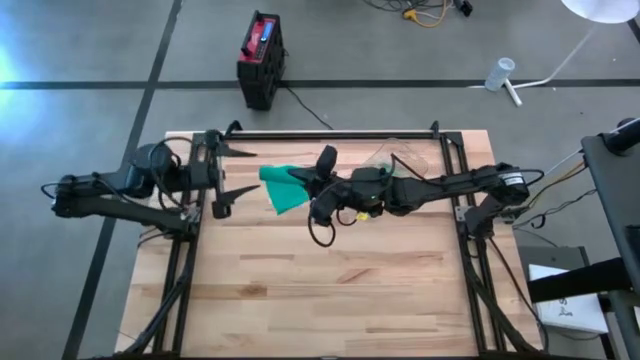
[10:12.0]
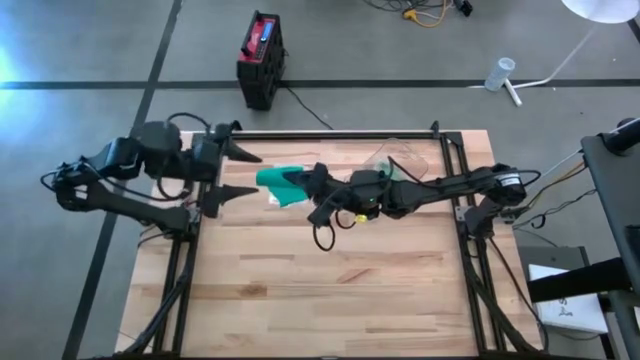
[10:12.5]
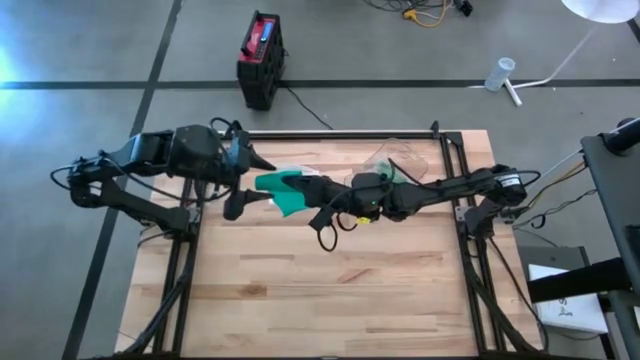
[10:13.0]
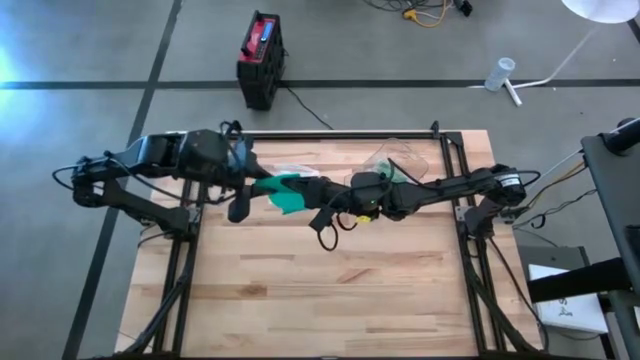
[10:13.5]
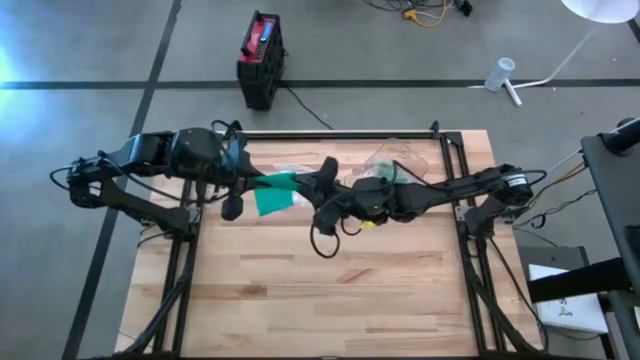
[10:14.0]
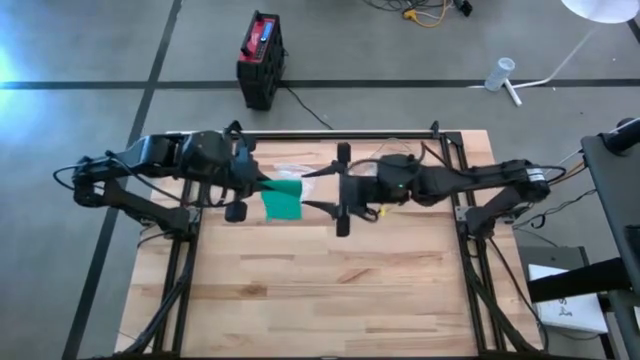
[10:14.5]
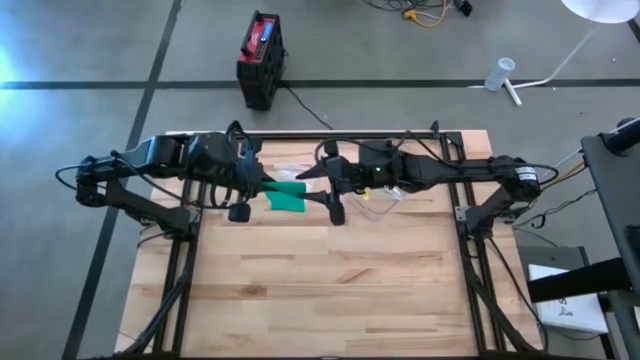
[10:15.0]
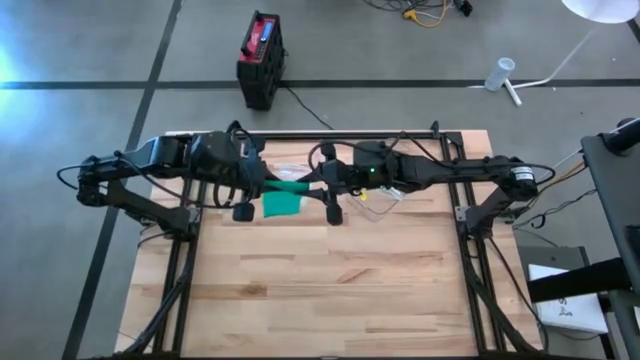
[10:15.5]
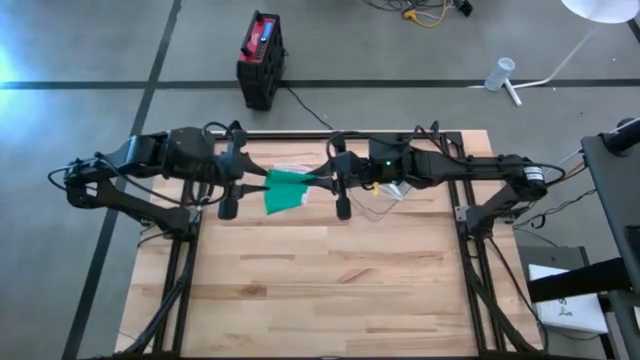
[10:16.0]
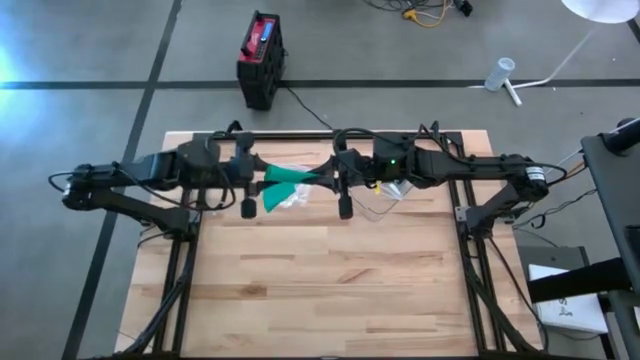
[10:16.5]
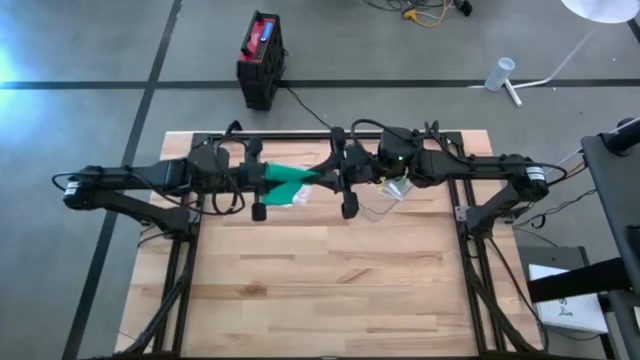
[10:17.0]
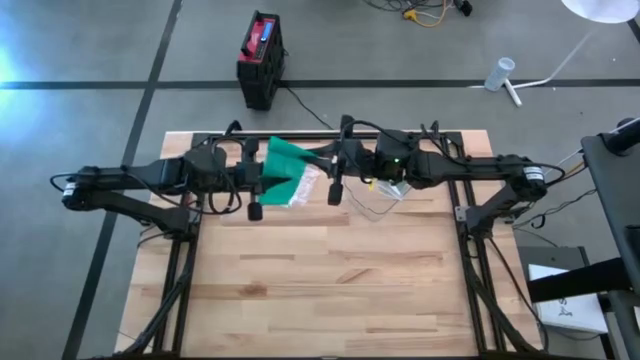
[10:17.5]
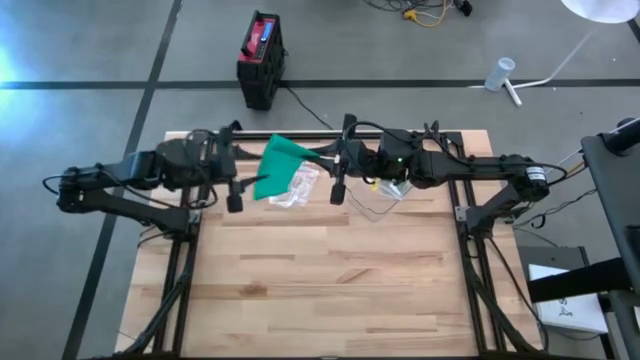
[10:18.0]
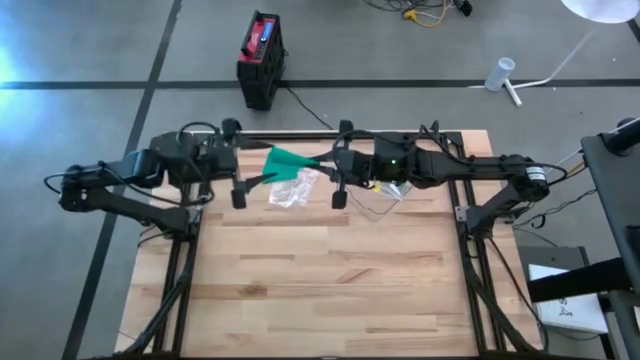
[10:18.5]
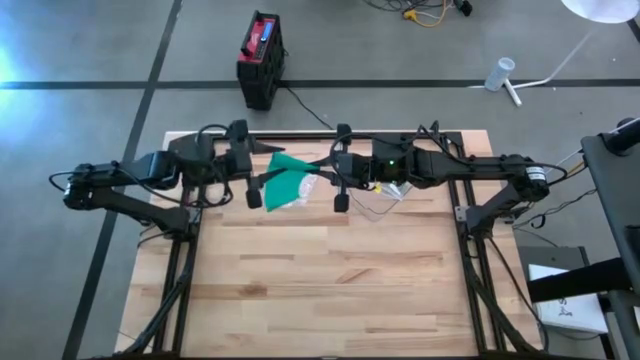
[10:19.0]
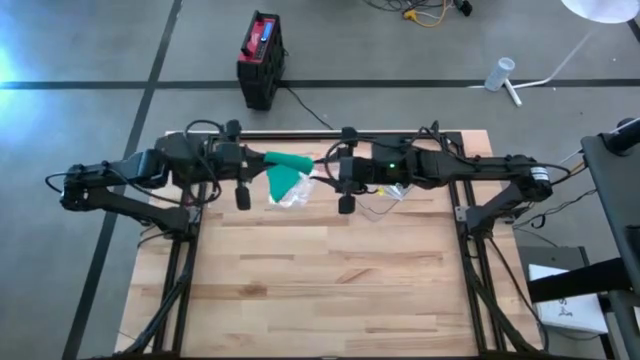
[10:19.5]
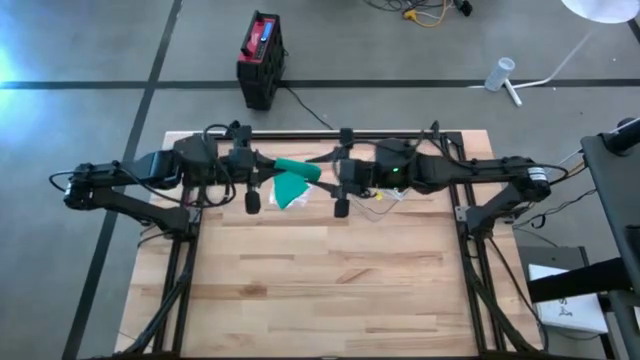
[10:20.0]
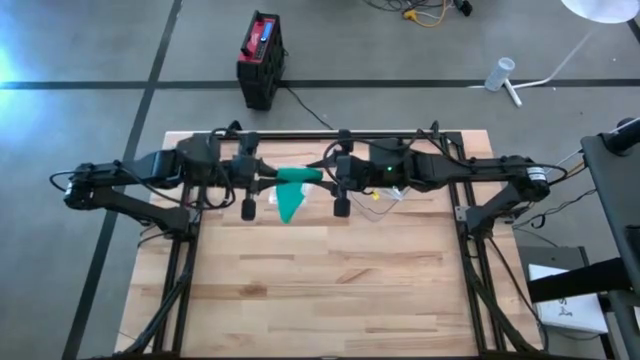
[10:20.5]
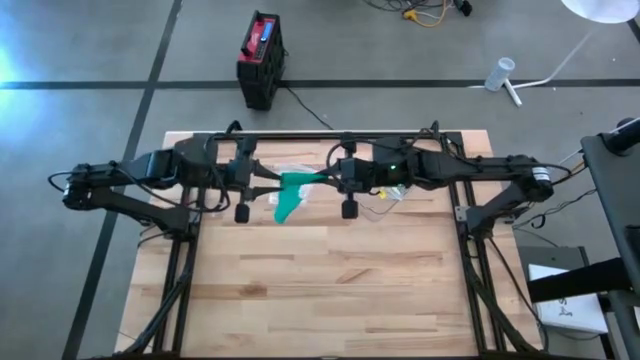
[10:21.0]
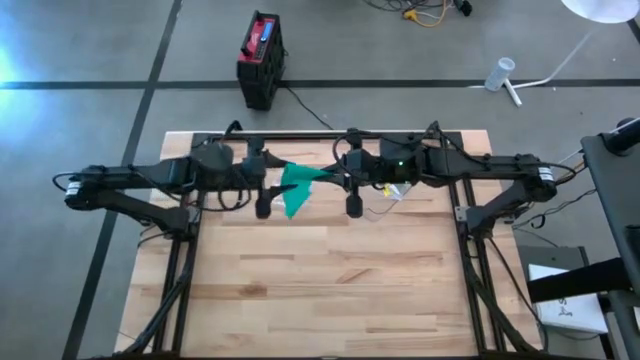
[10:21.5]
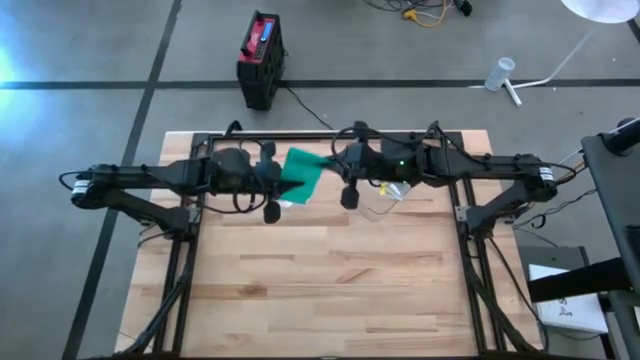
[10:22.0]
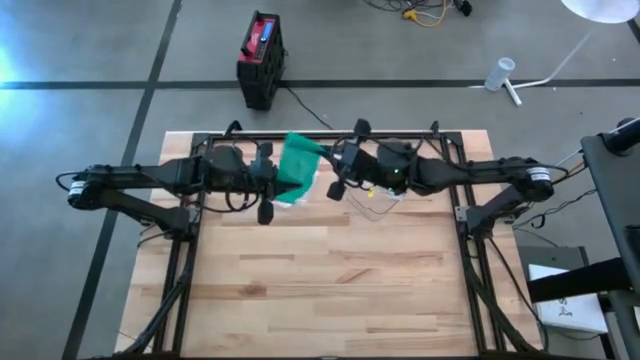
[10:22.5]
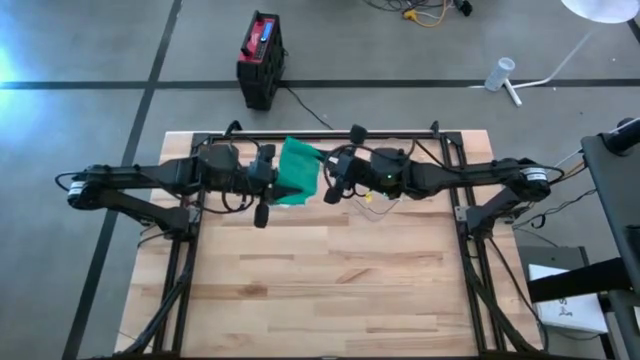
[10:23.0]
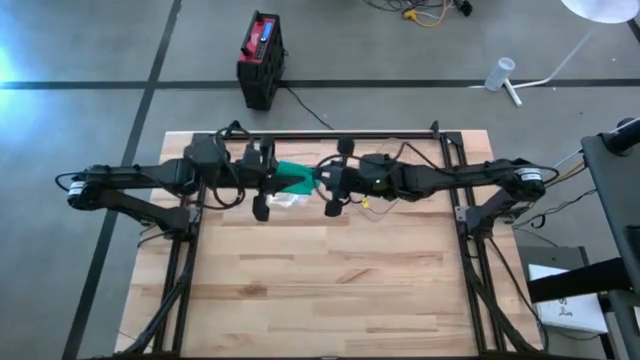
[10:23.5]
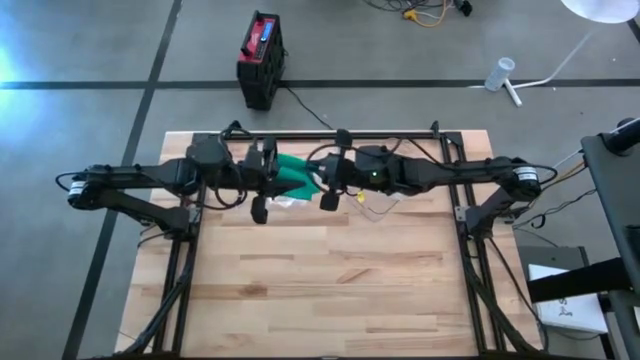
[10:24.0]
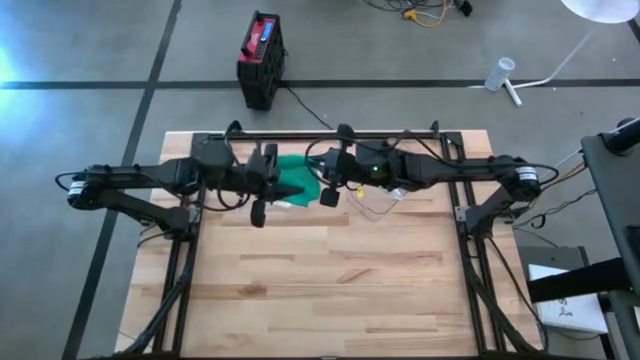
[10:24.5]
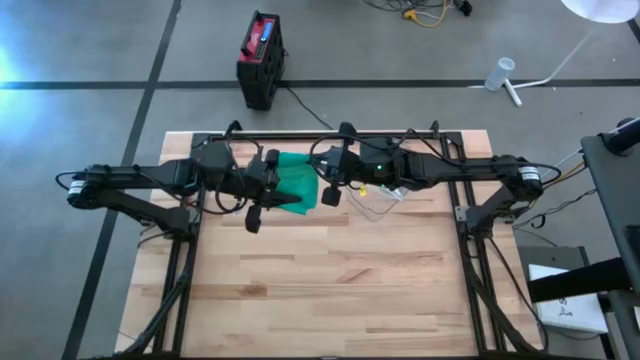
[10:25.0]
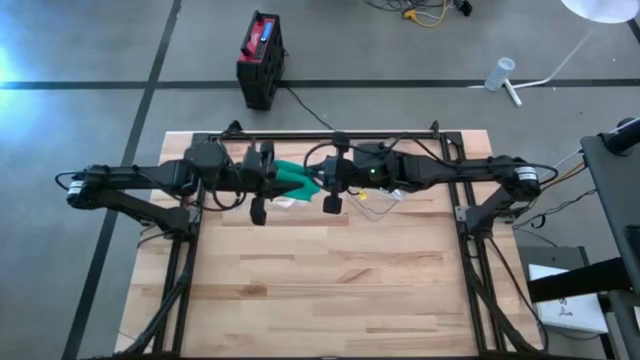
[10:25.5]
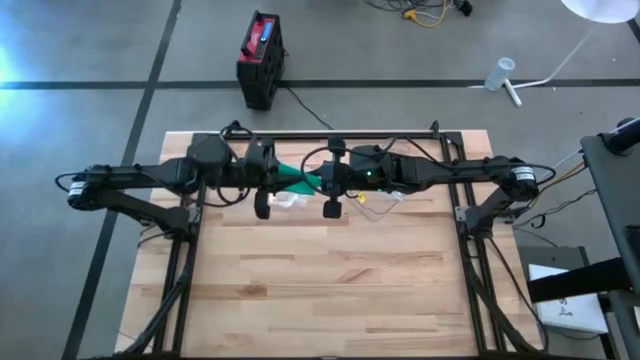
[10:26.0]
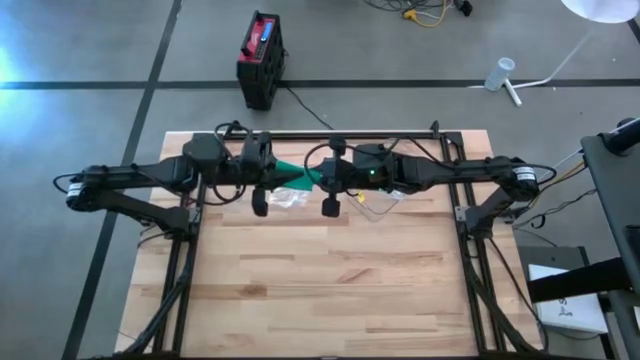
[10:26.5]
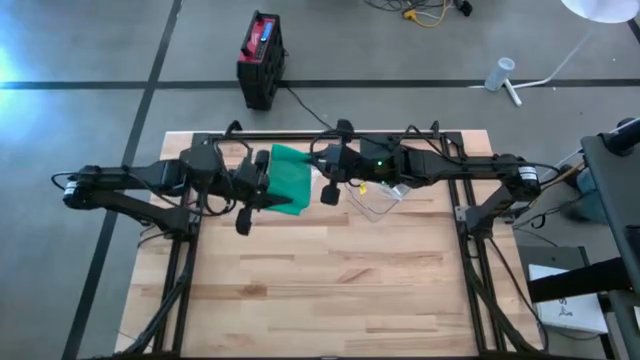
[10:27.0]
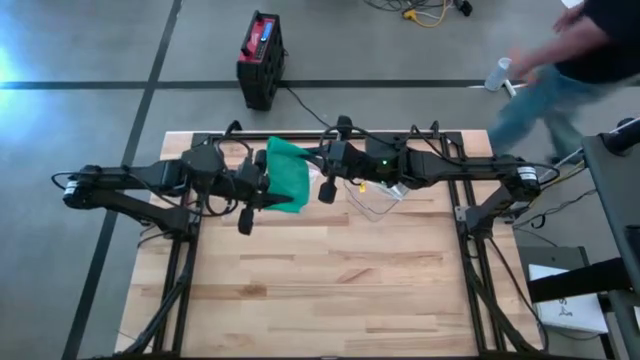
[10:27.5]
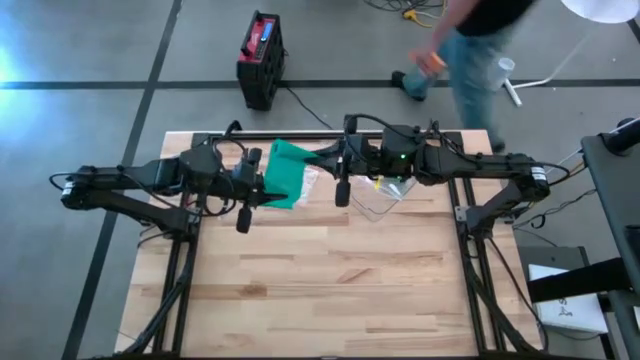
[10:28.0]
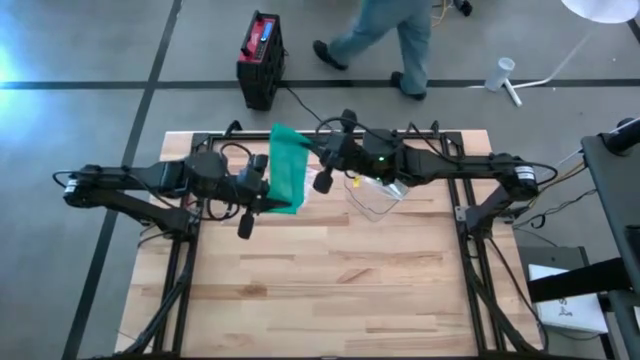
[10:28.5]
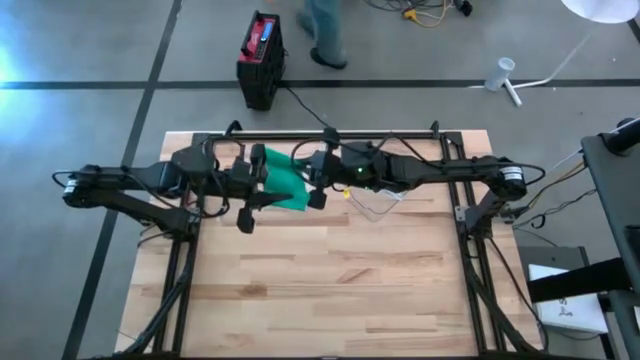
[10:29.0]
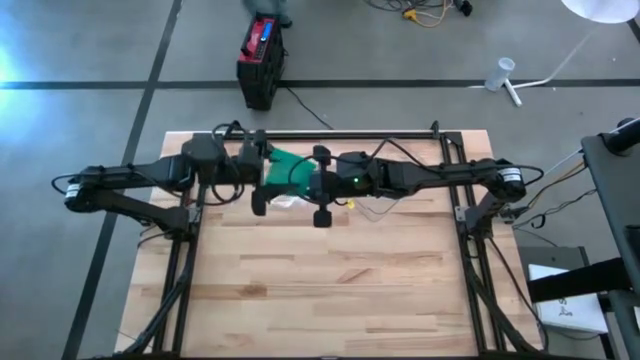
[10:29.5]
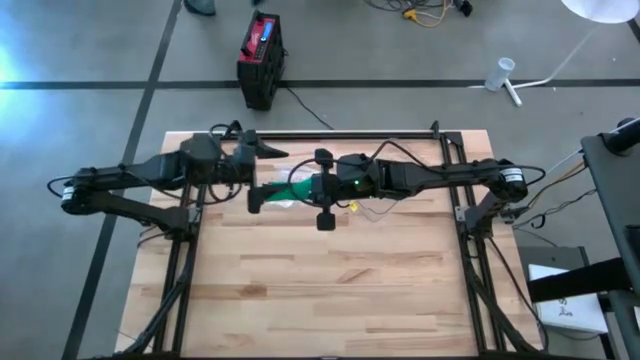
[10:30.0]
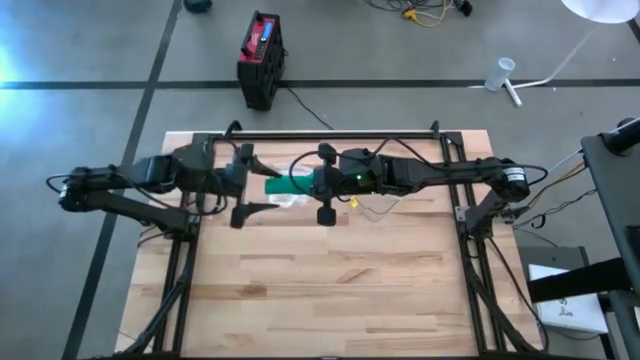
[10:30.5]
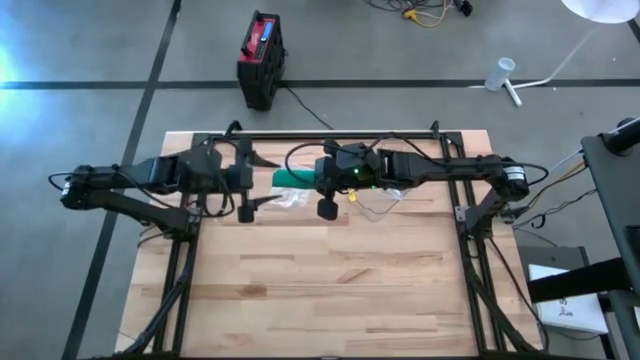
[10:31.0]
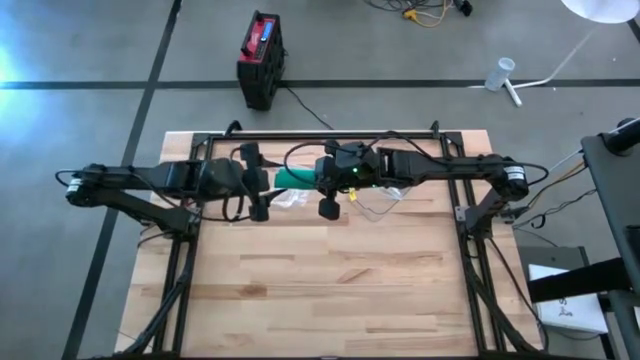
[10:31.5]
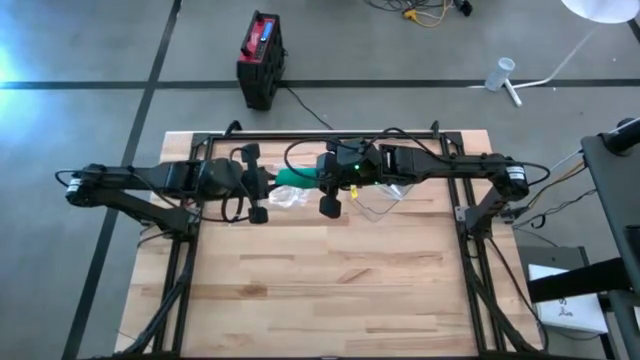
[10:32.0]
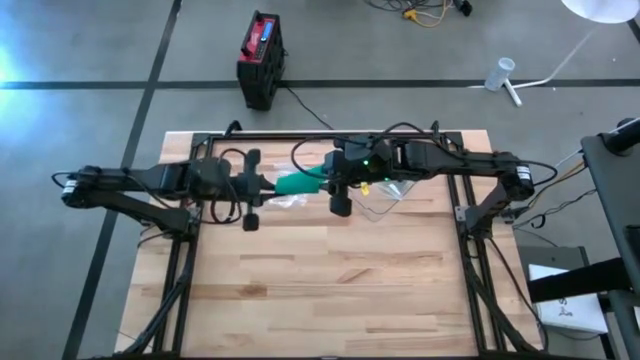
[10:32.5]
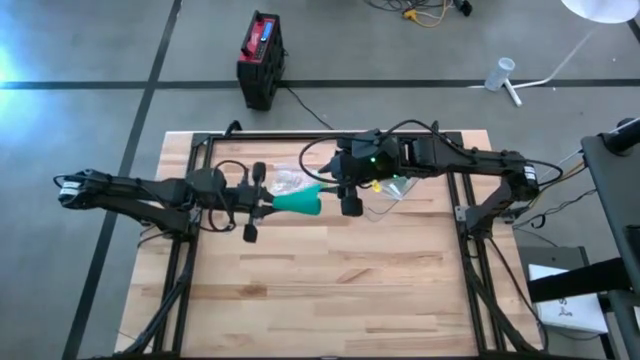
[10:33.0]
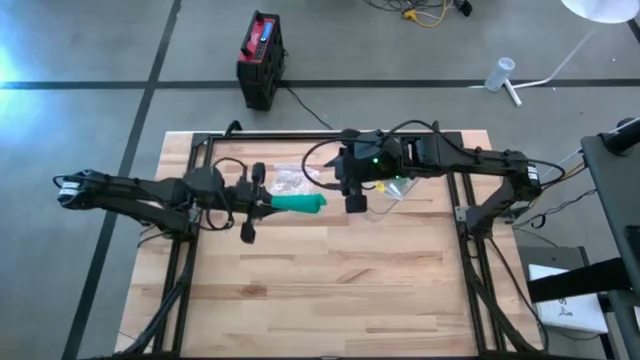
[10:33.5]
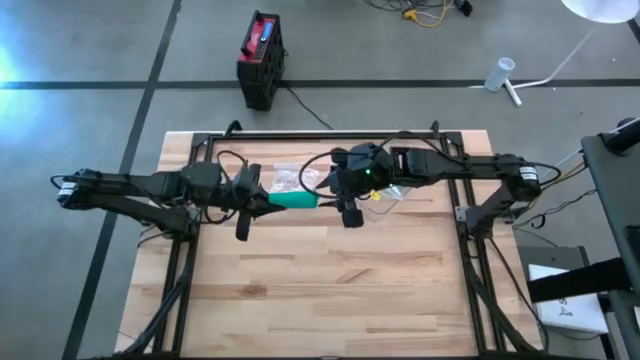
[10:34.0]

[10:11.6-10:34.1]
Task: Roll bandage
Roll the dark green bandage
